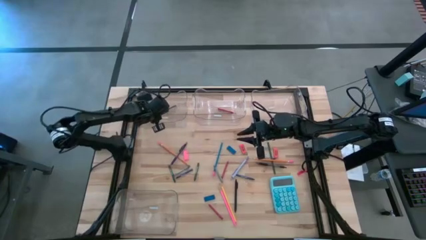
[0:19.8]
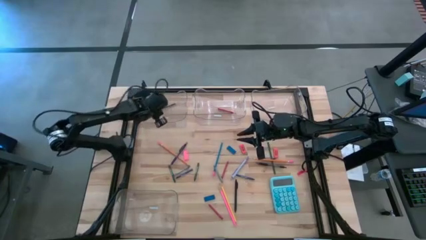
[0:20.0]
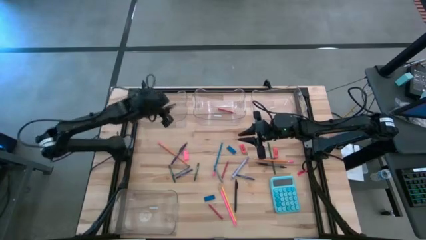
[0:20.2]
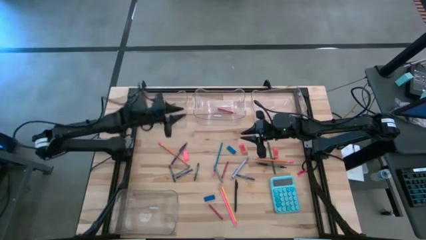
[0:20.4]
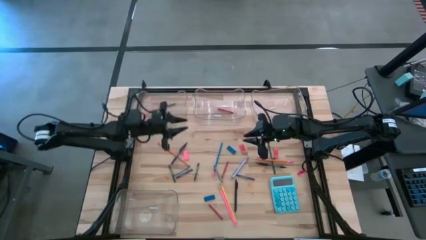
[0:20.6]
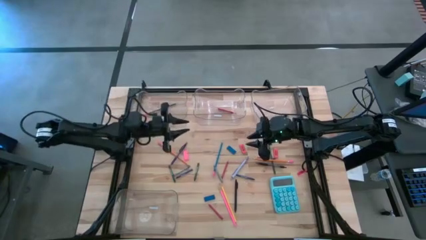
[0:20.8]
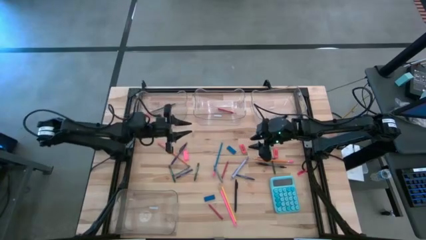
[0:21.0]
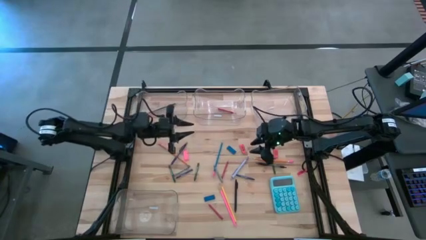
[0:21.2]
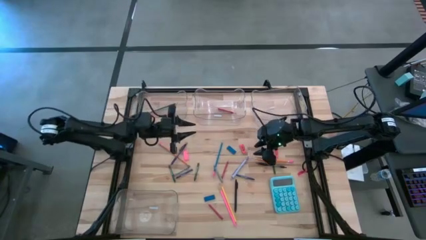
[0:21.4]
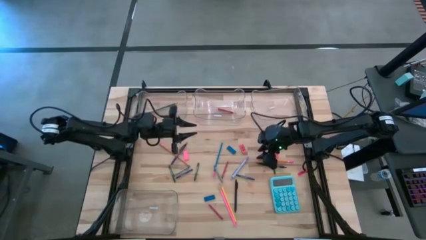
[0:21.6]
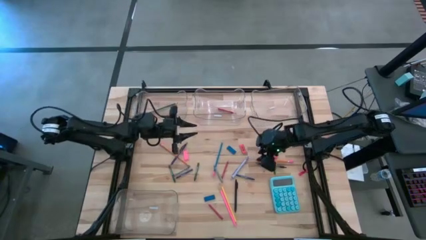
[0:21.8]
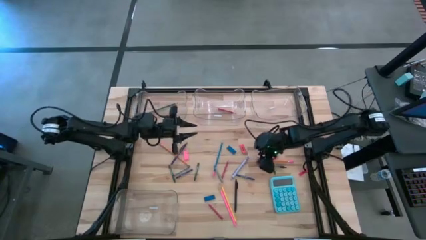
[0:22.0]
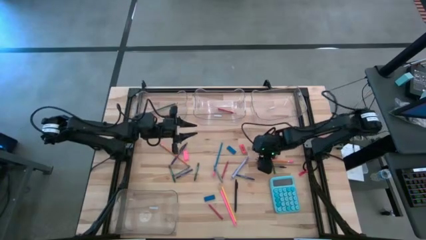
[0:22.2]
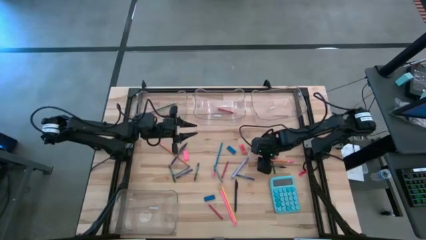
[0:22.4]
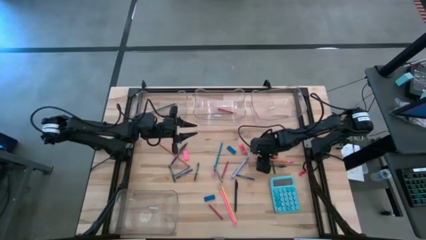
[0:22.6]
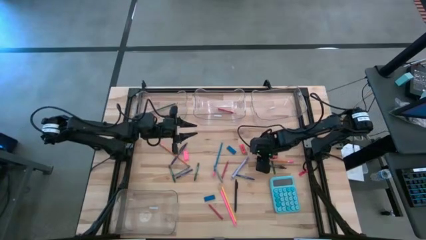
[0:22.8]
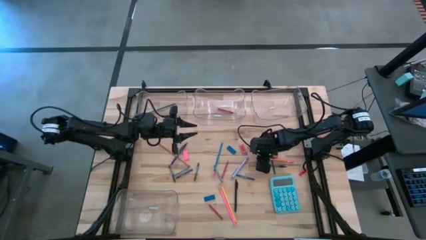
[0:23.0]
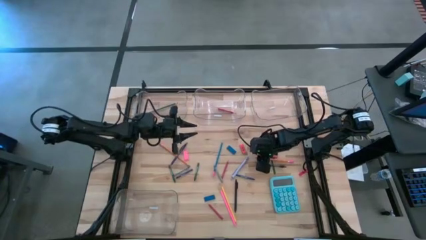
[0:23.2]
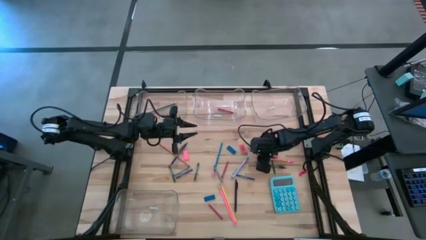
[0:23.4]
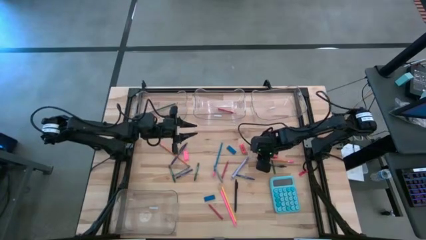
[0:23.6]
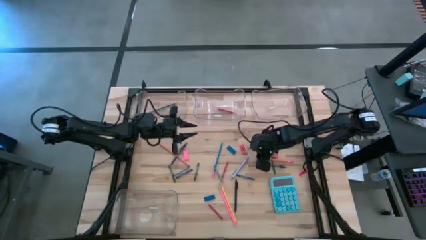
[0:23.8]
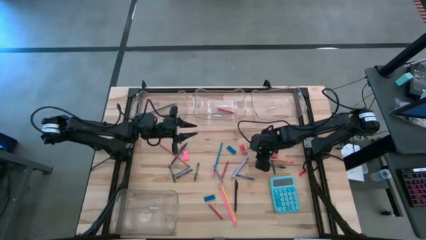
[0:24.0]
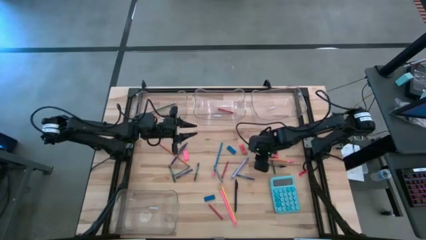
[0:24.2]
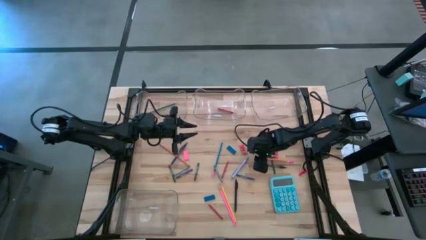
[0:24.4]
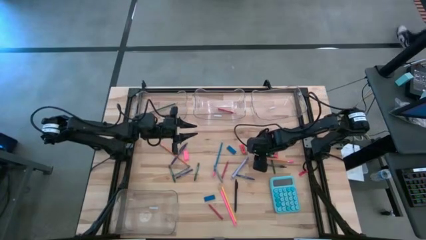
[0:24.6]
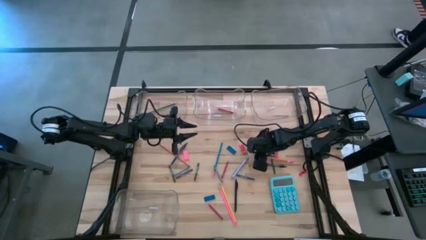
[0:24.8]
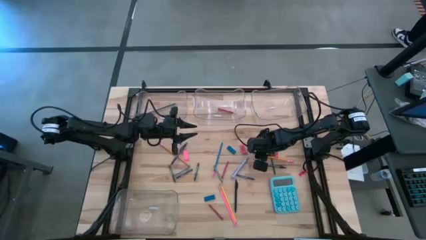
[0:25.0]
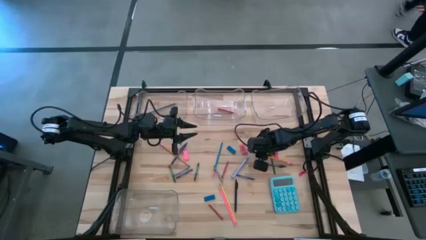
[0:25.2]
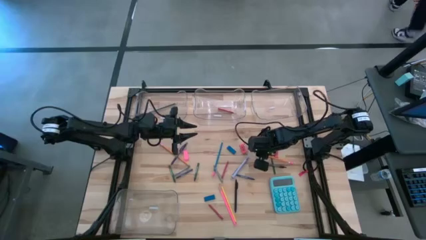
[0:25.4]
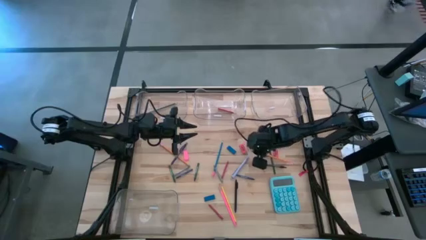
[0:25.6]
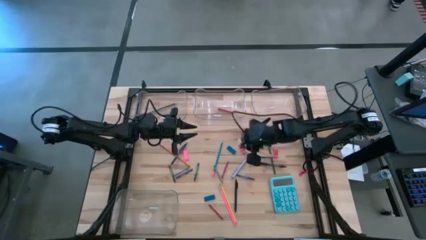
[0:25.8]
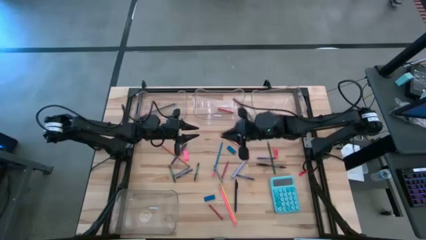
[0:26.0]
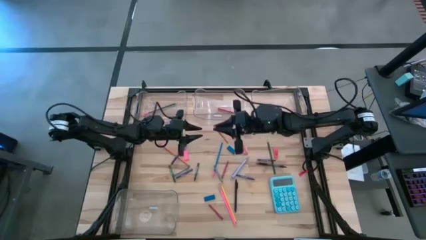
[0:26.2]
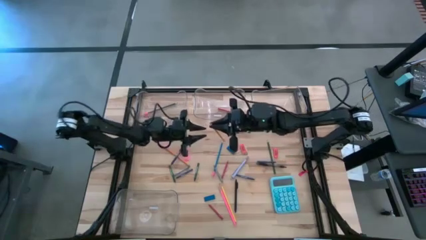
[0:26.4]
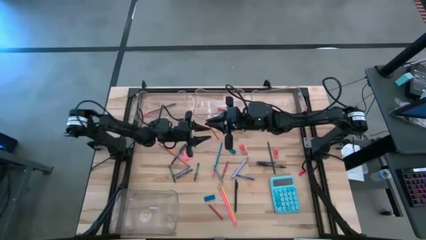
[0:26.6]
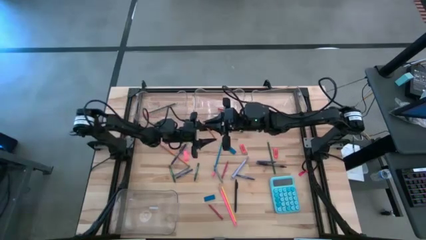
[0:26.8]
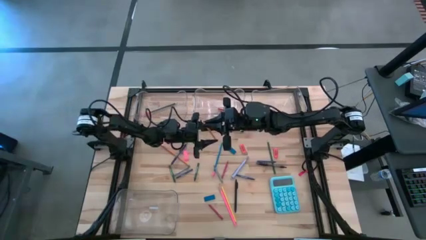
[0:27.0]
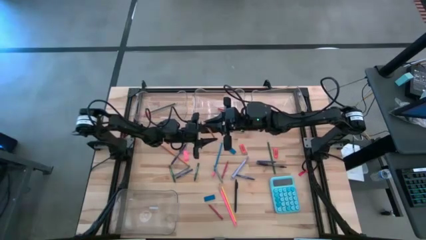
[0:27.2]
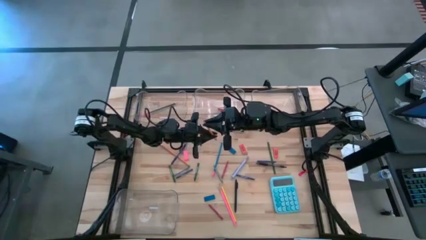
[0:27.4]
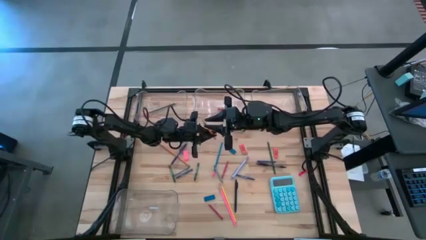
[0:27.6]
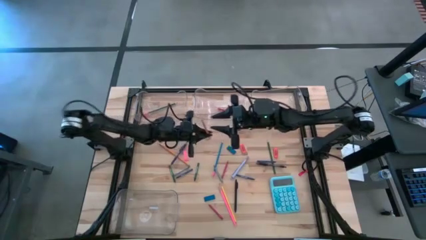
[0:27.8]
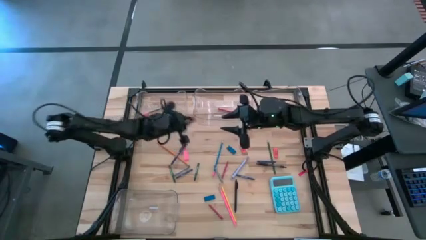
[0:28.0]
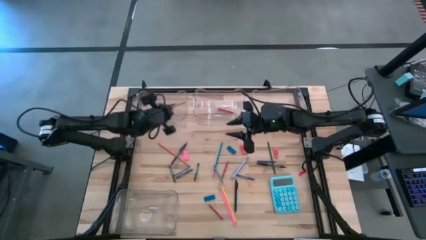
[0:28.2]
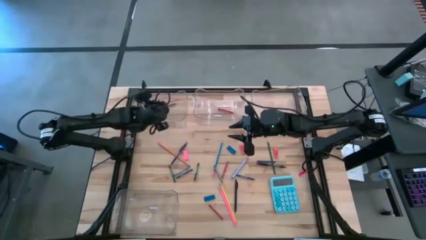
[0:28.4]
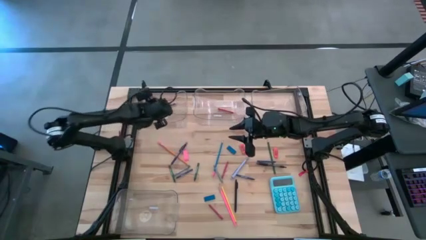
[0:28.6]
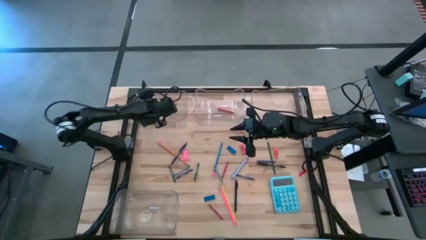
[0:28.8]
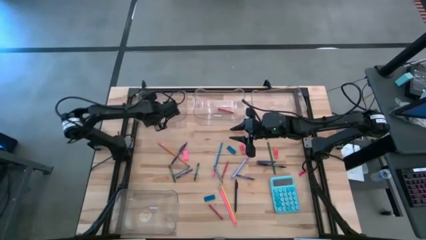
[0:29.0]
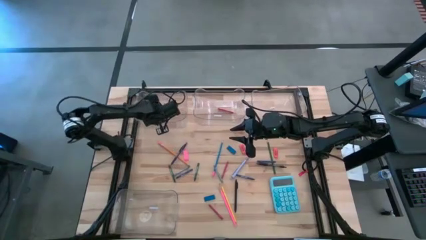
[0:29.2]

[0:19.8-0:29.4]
Task: Sort crayons/erasers/pens/pencils in bins
Put the orange pencil into the top left transparent bin

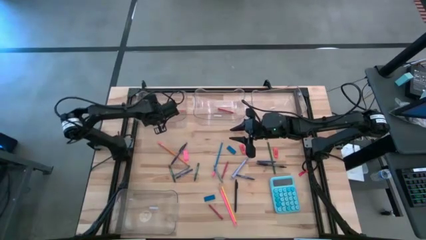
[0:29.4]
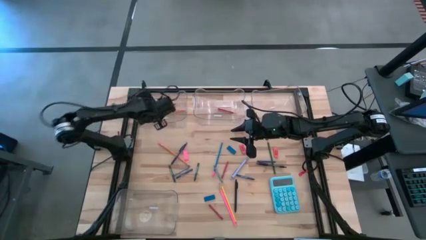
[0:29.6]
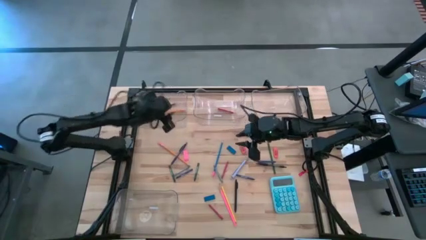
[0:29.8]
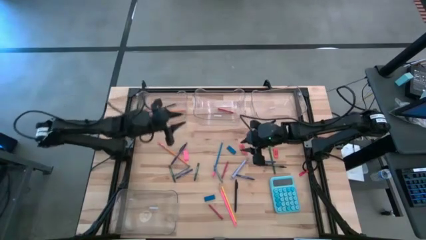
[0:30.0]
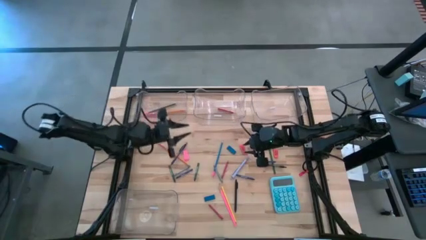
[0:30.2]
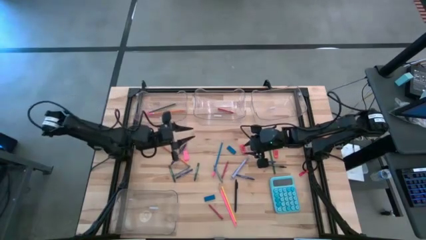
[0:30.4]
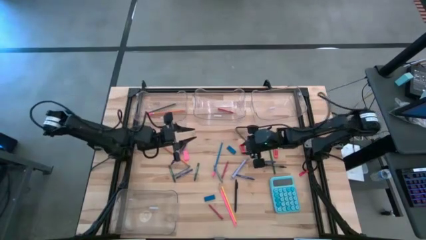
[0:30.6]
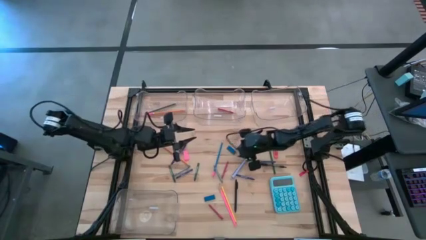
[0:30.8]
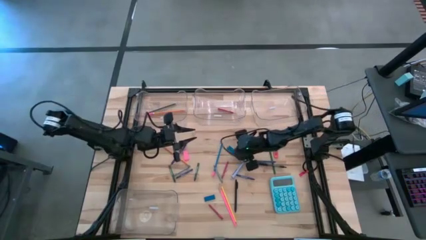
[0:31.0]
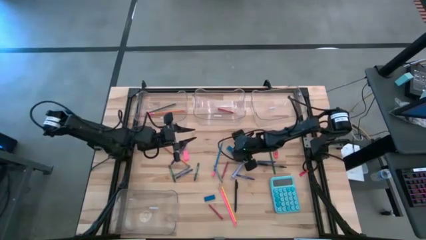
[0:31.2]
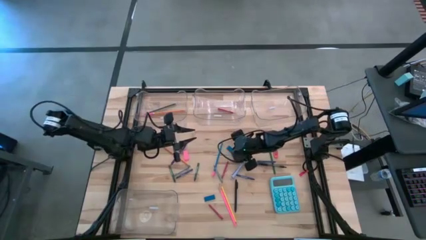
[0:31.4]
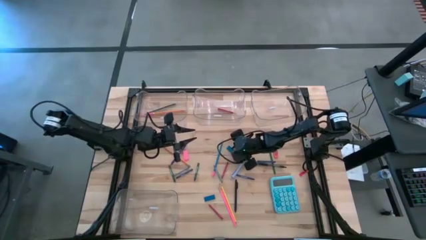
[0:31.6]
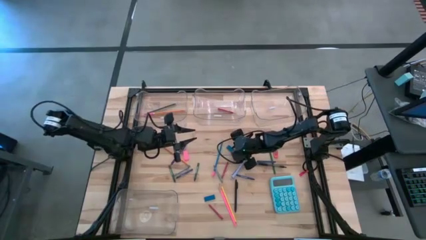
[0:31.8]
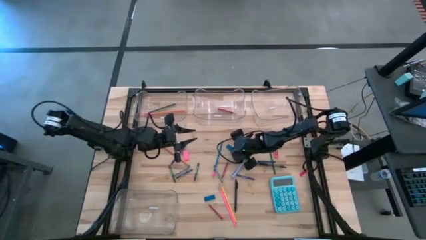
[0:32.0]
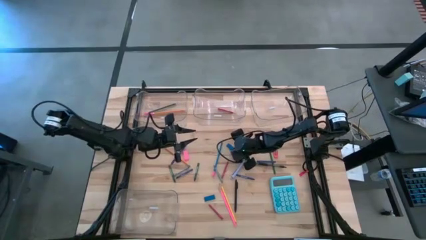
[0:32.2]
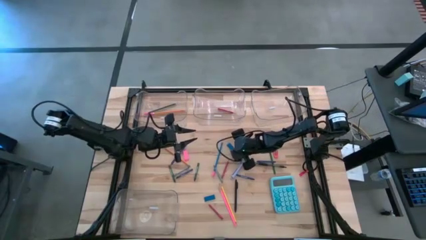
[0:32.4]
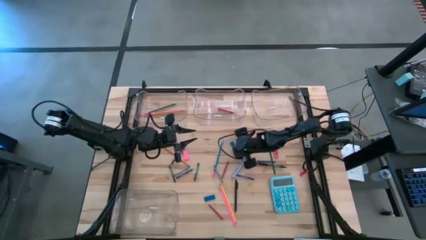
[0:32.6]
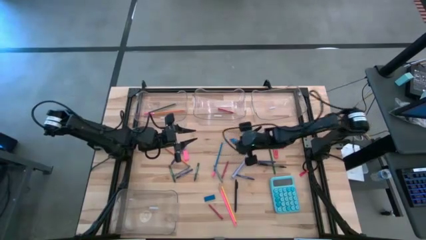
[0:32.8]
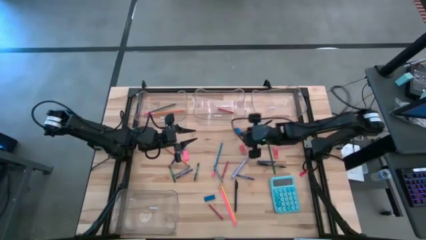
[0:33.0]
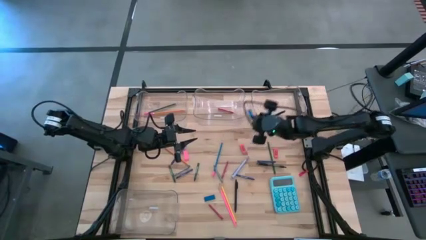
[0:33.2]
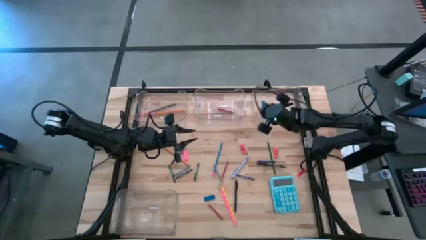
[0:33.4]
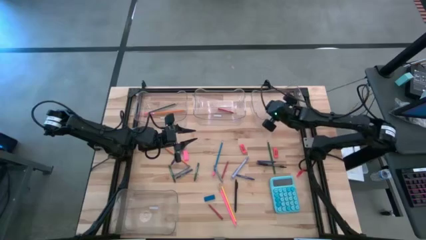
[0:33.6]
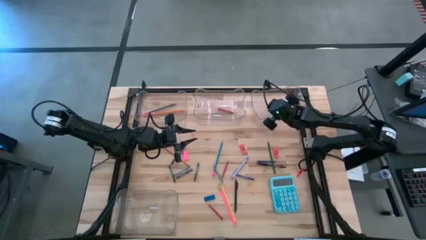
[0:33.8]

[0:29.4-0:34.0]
Put the blue eraser into the top right transparent bin

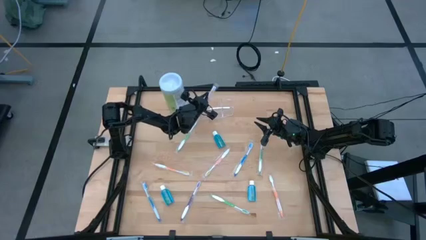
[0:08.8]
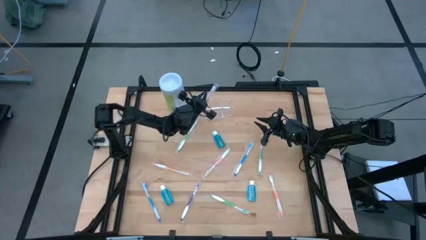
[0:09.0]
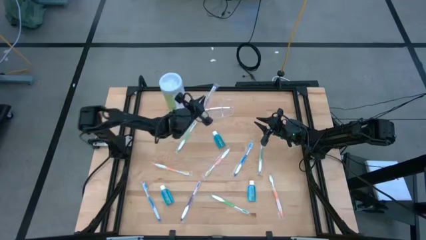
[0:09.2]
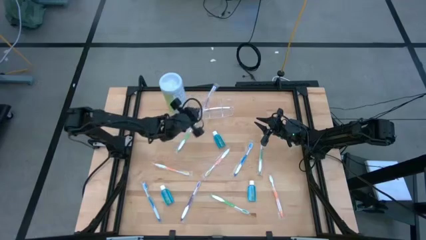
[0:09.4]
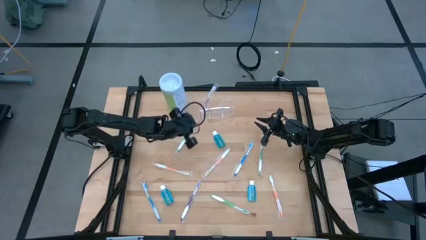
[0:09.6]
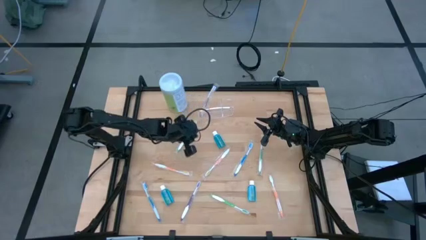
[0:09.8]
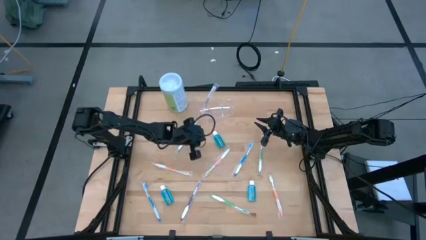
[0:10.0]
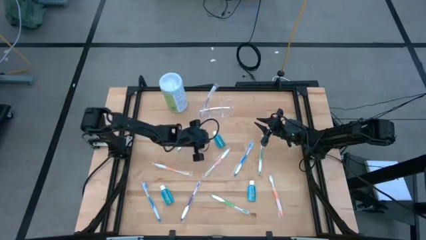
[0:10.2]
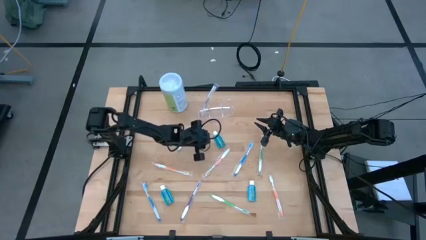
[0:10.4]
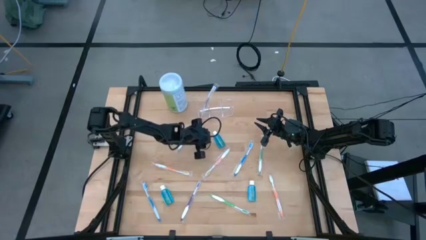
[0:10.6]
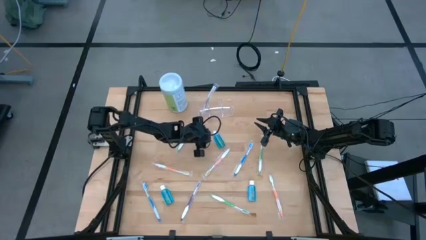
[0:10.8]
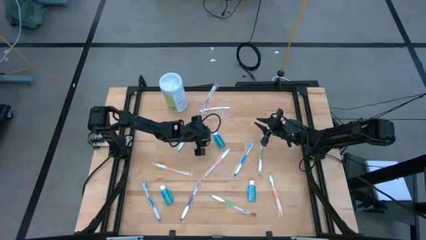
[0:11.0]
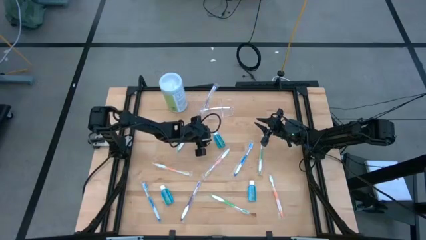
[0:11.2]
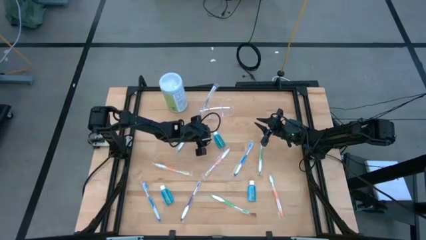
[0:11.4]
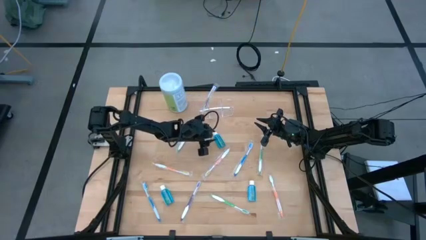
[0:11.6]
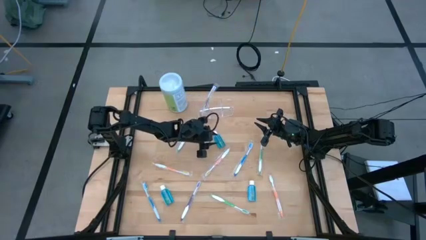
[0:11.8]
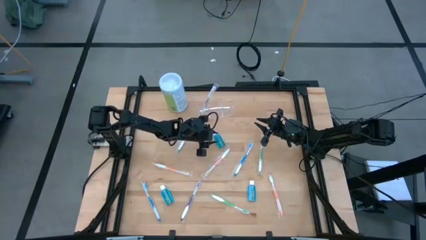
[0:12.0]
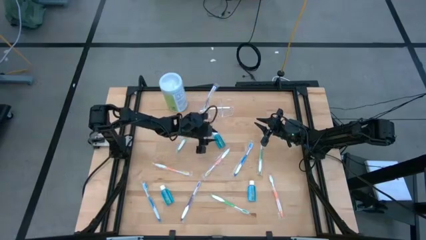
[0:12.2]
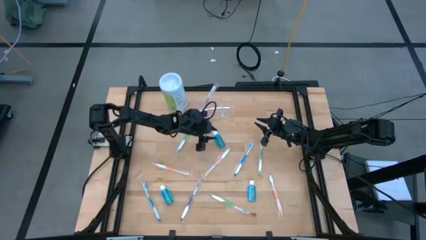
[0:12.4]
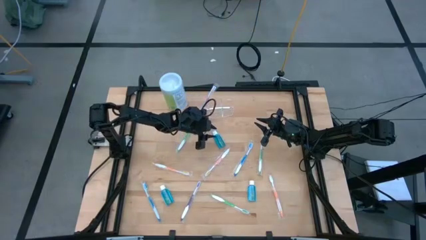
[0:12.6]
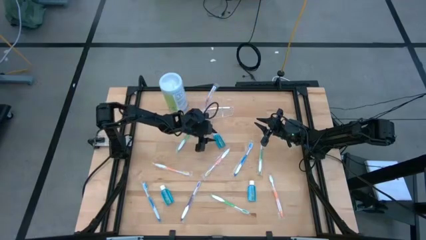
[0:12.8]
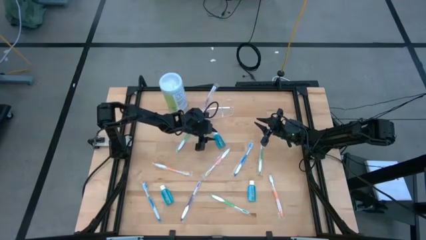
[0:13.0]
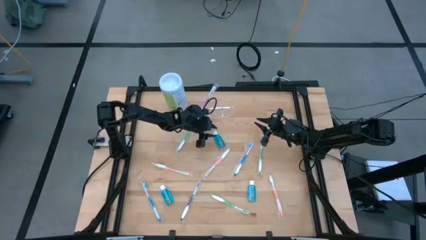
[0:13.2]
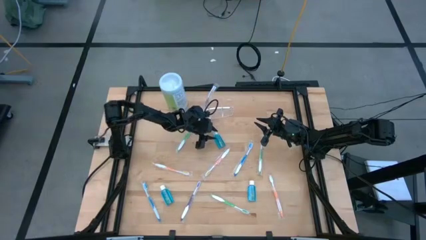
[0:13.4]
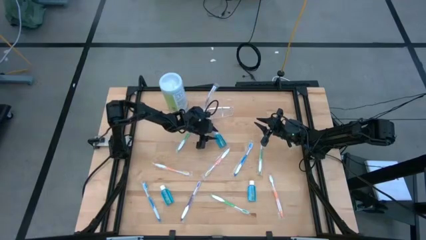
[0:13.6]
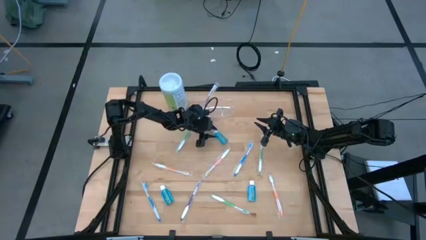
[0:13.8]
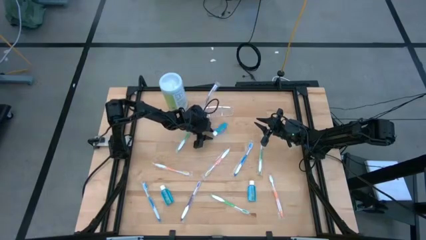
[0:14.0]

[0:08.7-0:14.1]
Task: Pick & Place toothbrushing station
Put the top blue mouthwash into the transparent organizer
